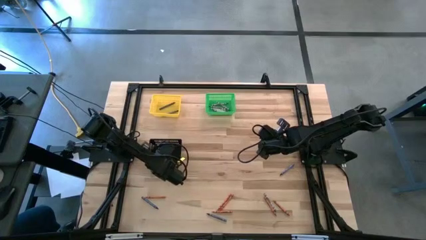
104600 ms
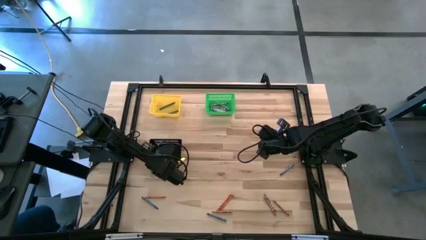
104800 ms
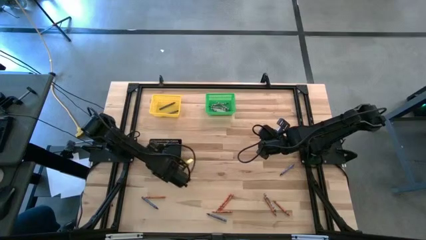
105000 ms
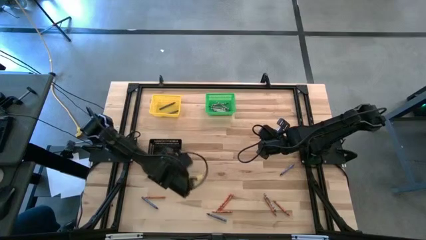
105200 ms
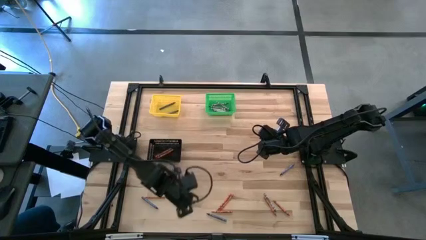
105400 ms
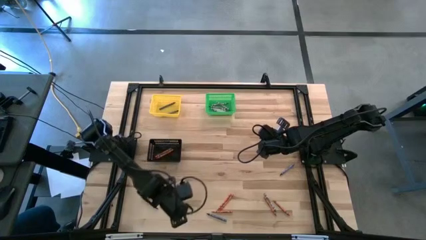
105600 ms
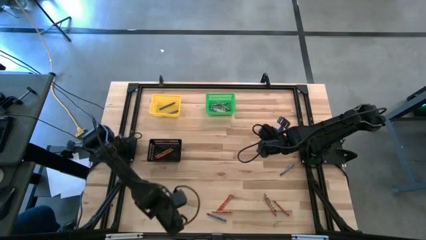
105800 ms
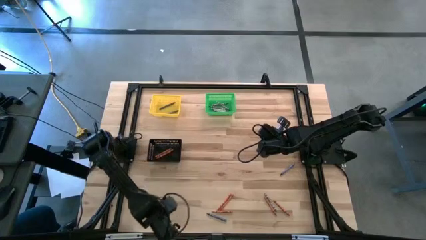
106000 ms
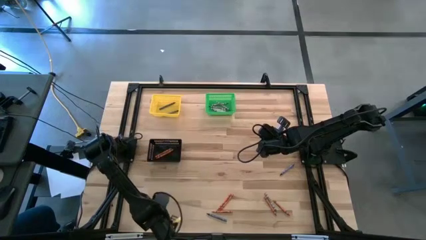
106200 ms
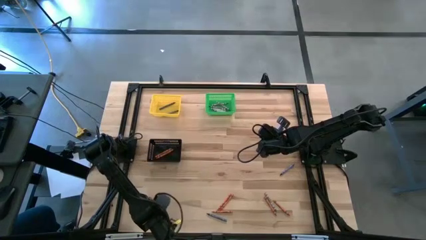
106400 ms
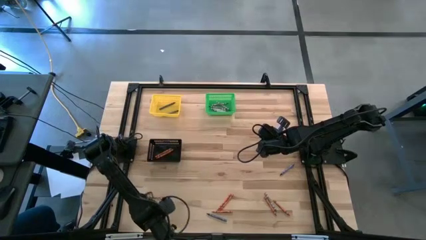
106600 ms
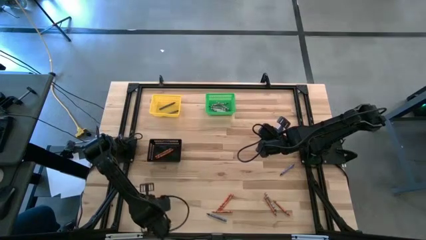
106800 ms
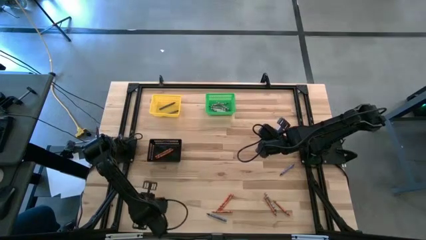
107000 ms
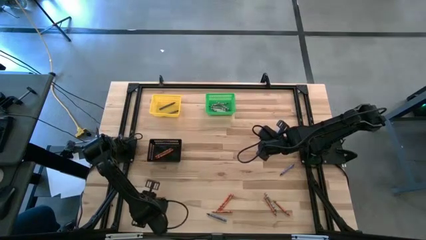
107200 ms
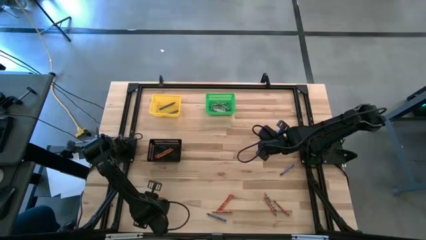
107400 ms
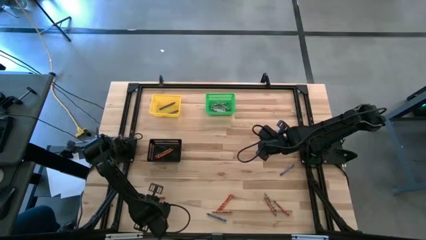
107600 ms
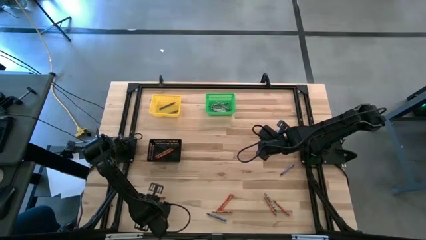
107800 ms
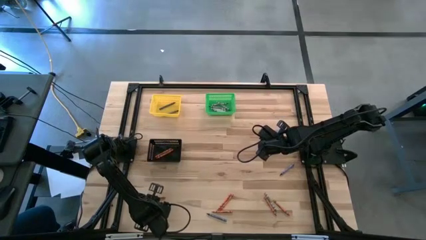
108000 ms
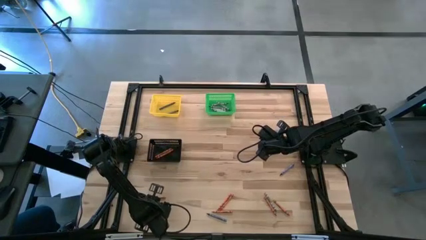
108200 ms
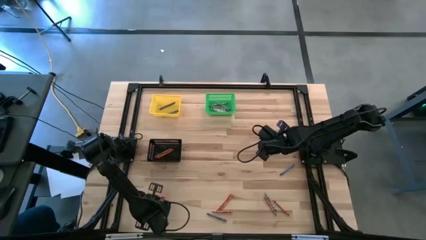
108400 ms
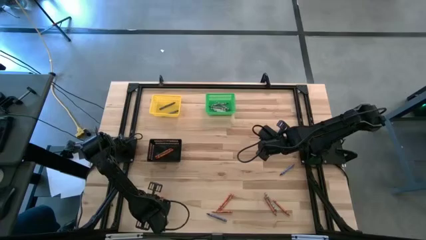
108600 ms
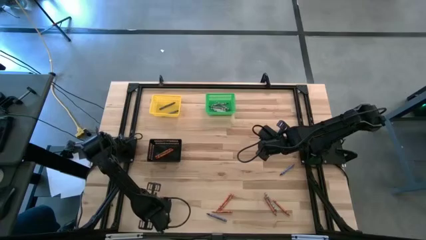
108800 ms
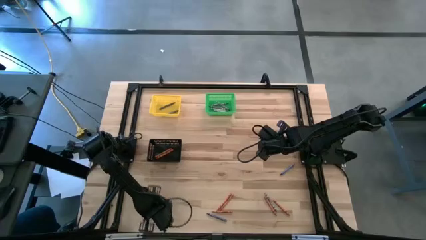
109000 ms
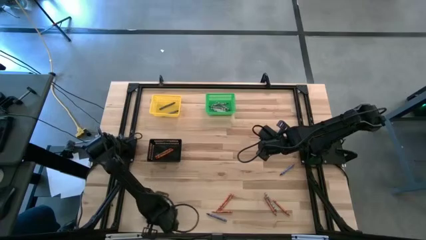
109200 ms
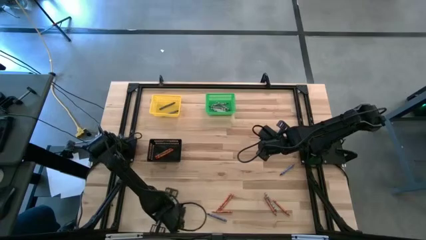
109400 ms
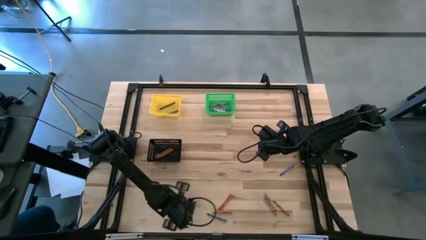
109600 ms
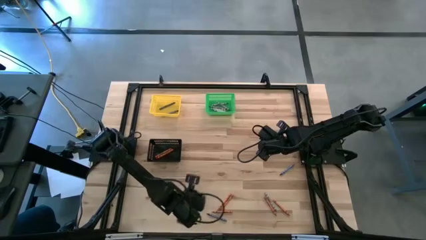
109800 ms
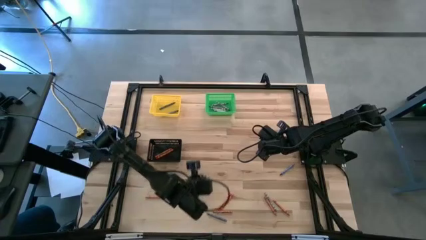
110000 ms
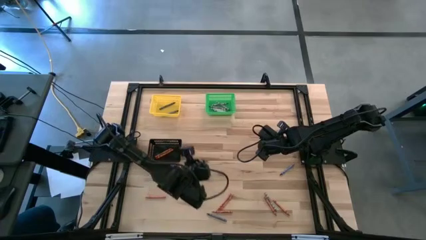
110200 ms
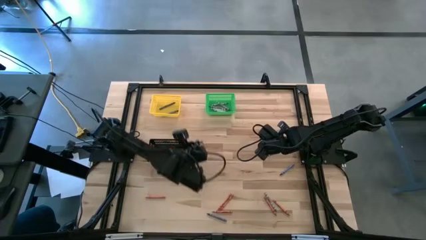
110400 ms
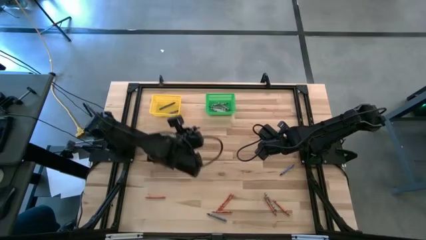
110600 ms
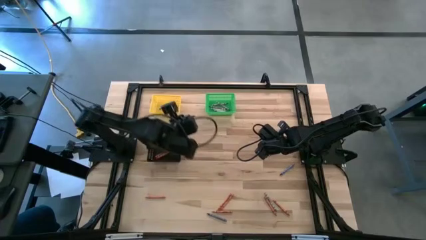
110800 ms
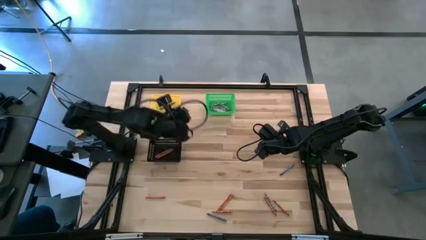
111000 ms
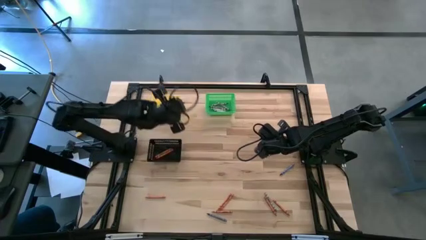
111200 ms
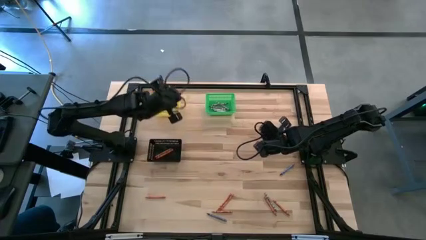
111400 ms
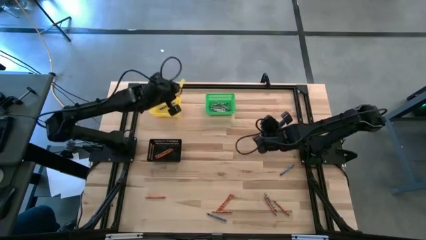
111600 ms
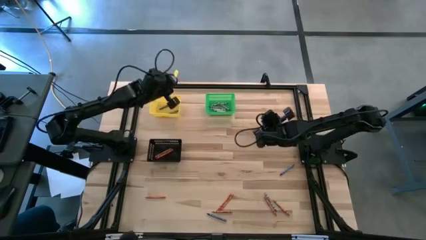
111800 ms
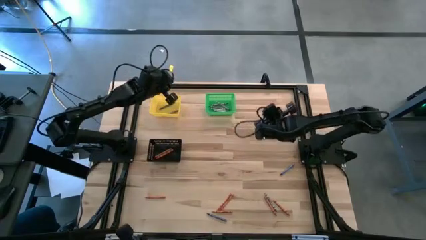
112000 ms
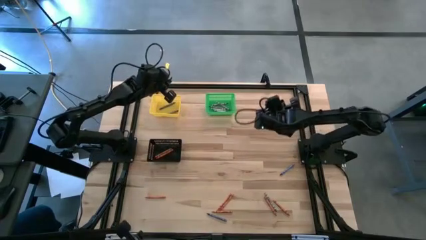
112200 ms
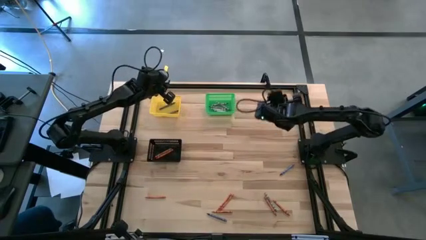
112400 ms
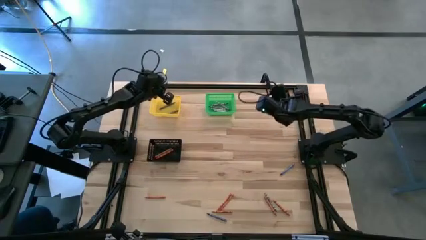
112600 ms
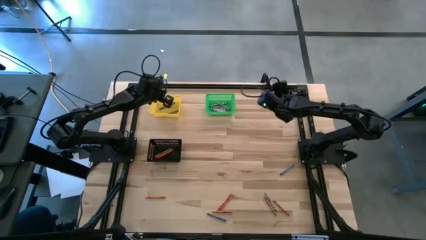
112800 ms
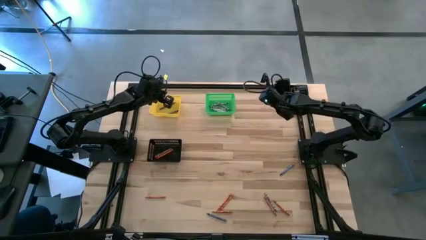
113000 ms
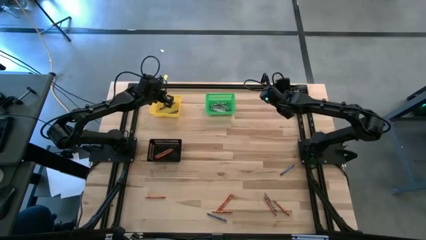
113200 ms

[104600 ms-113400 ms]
Task: Sort crayons
Put the blue crayon into the yellow bin

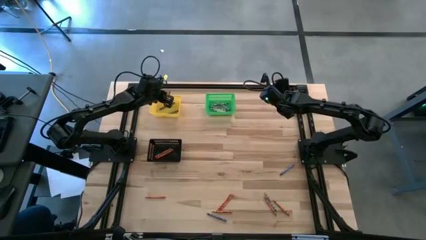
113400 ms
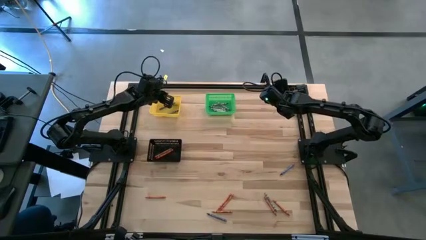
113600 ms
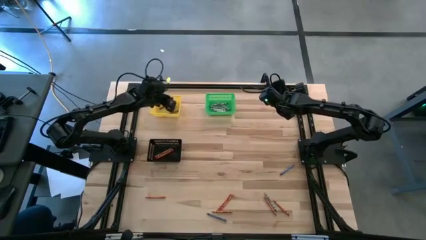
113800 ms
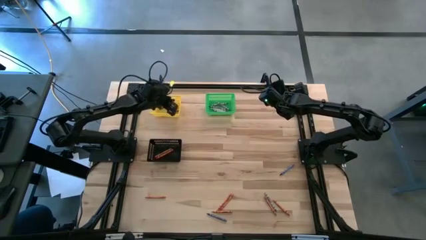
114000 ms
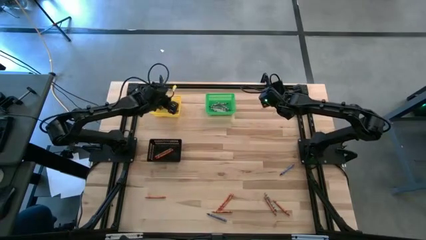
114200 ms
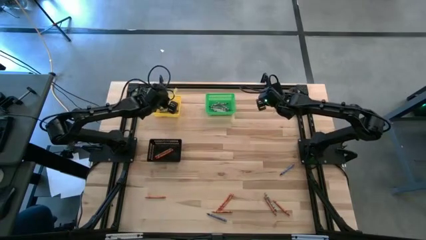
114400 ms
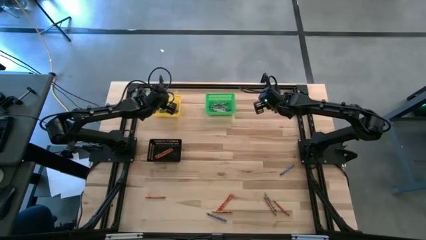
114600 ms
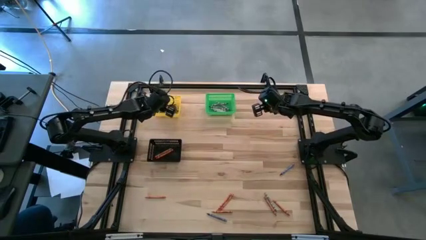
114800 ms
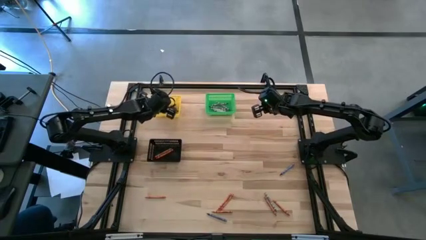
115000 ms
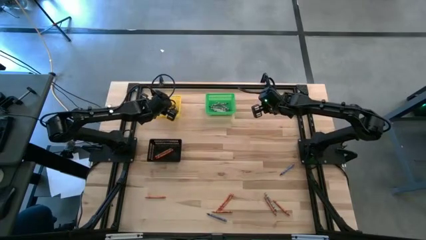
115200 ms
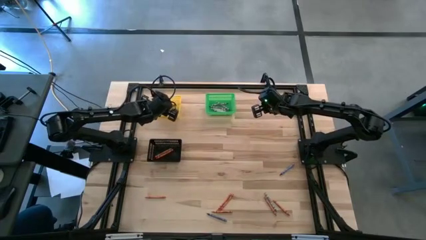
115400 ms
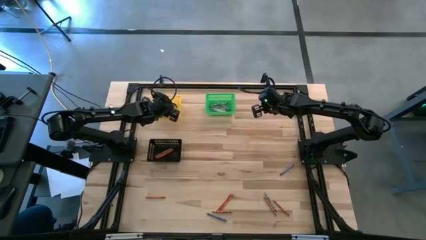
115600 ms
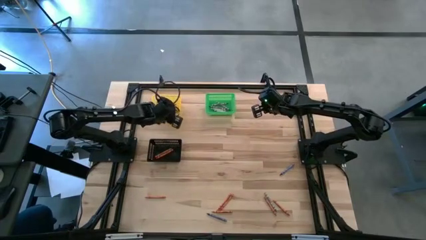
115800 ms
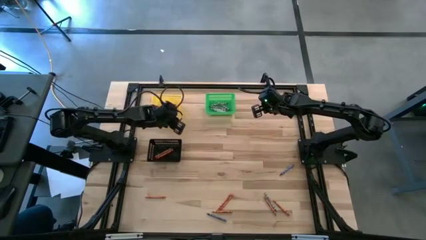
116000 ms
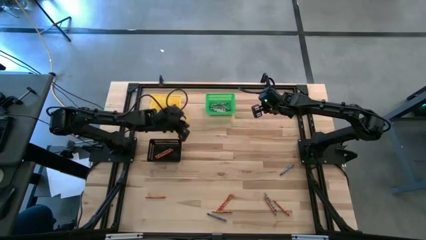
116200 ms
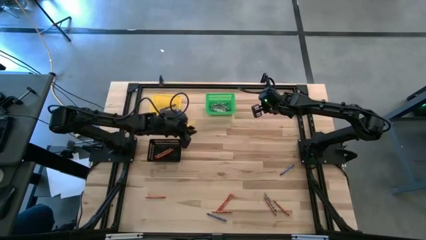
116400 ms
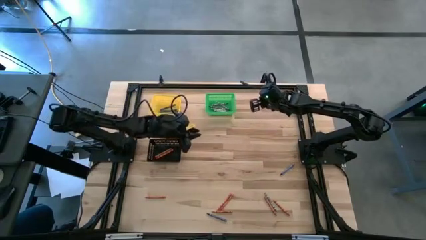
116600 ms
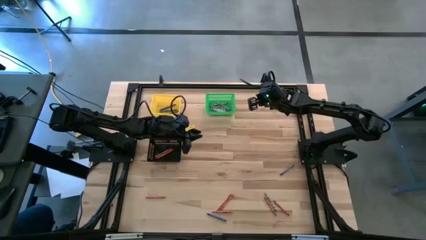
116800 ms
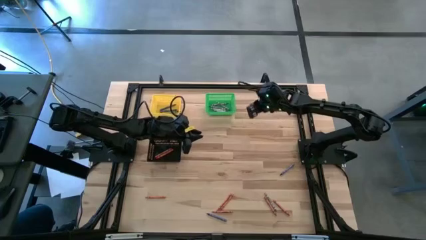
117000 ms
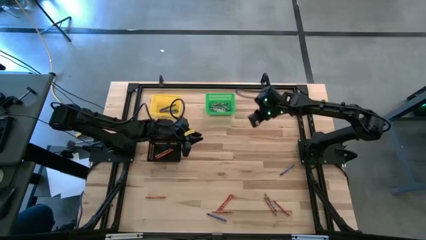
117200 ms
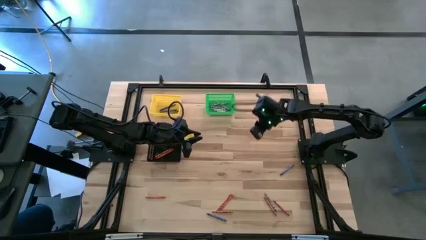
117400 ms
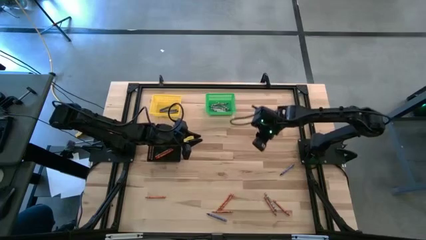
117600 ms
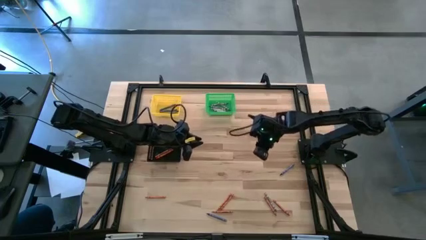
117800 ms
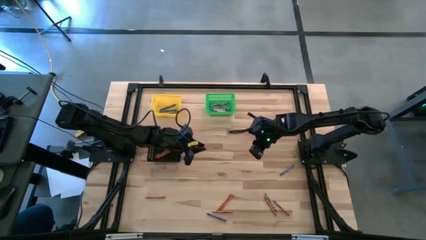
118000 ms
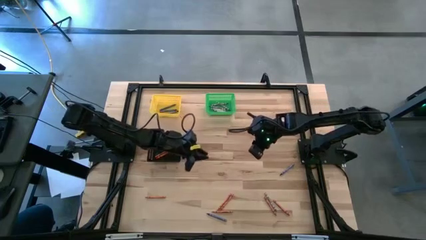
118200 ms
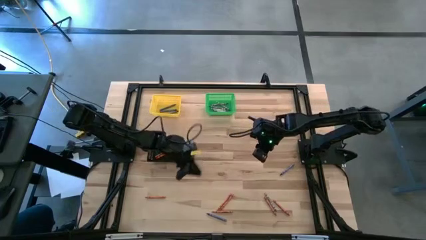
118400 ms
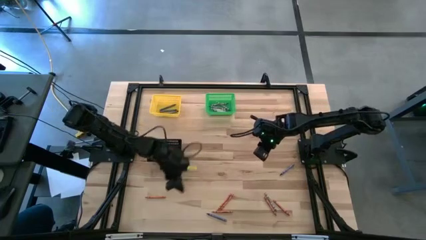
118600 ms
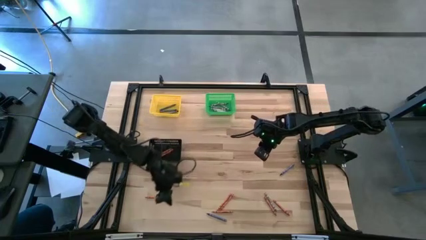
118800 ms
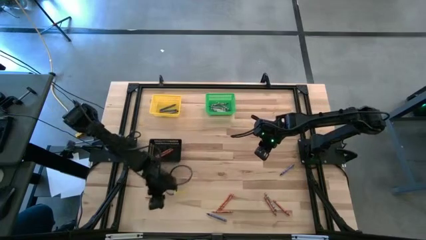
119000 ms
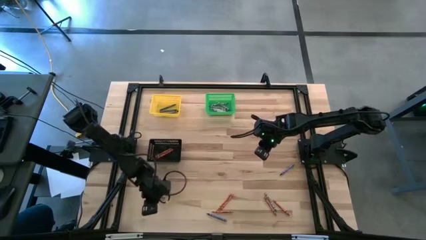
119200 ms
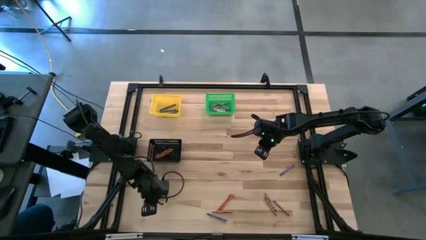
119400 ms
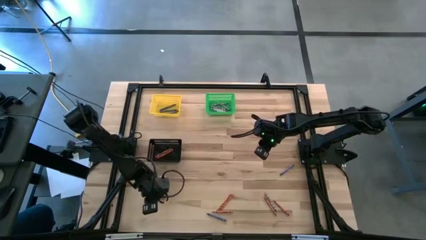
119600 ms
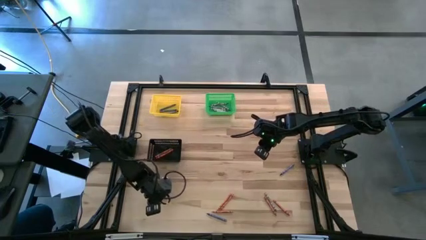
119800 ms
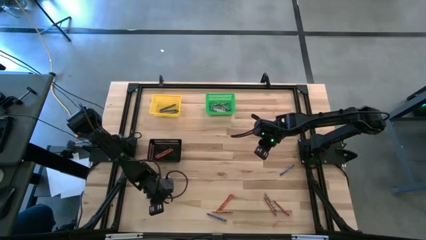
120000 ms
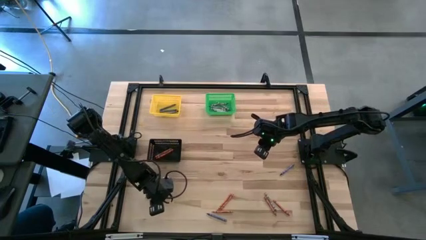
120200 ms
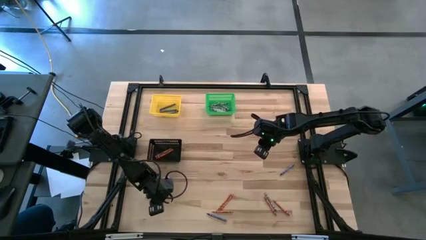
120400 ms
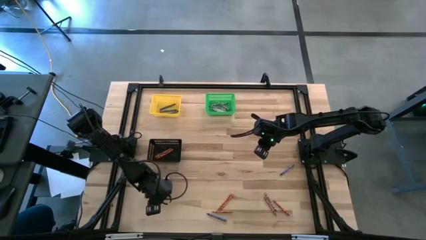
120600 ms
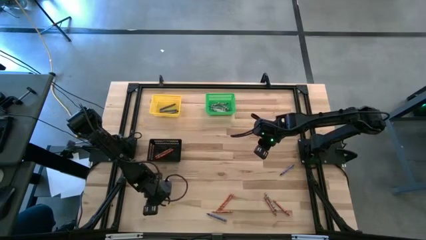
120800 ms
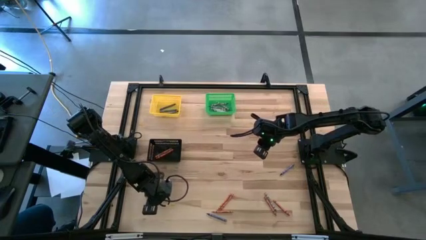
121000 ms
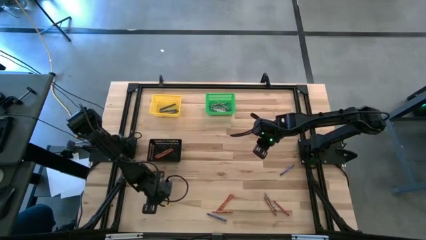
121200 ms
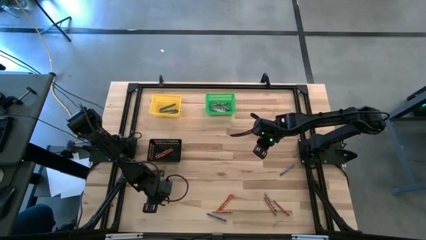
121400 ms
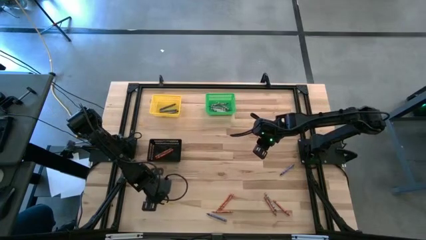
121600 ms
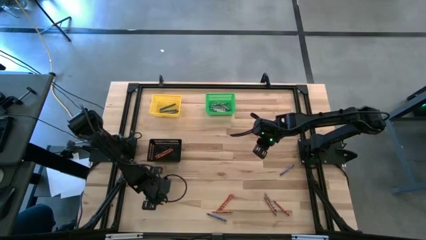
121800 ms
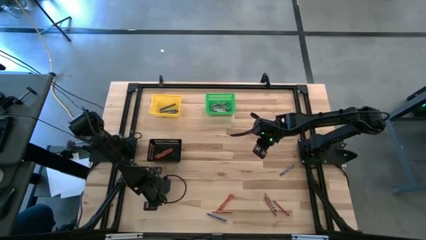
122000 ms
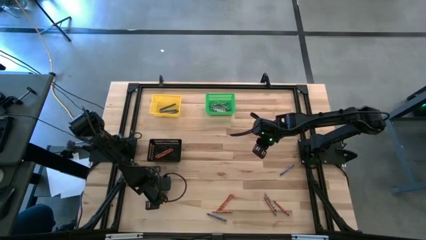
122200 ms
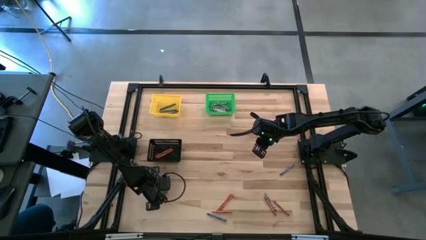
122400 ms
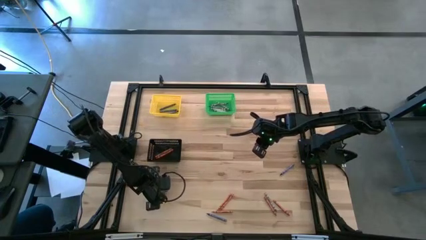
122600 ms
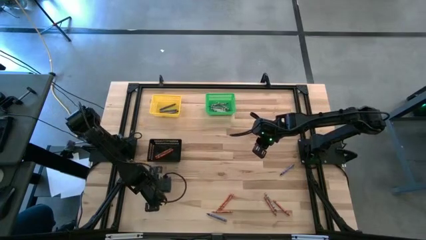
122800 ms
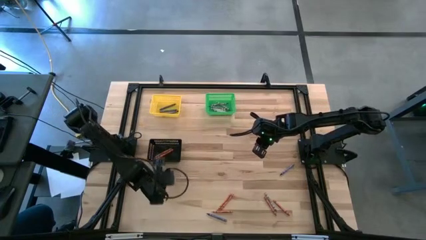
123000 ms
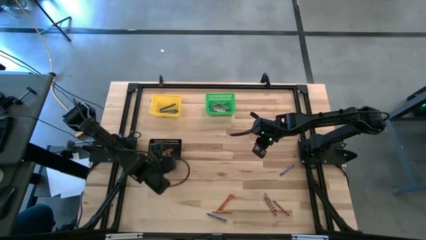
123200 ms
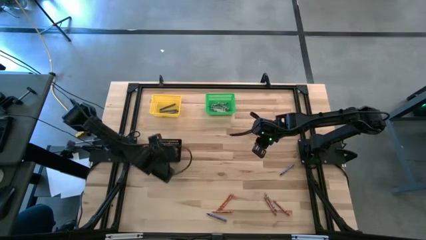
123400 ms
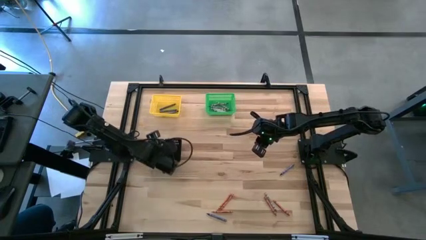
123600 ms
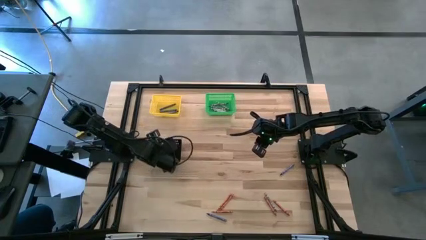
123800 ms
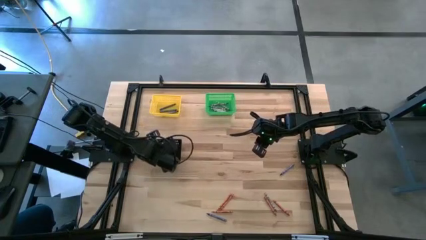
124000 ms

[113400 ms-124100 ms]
Put the orange crayon into the black bin
